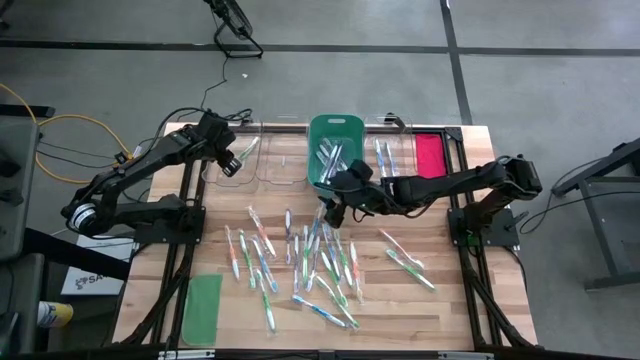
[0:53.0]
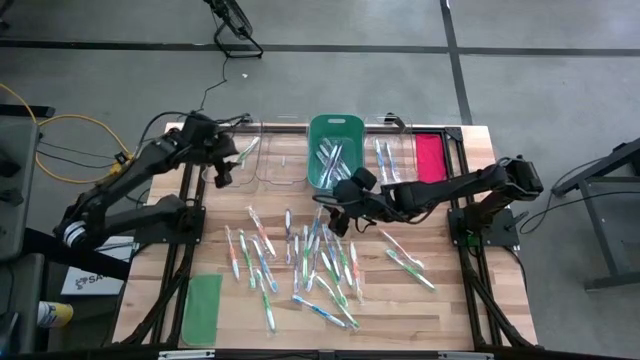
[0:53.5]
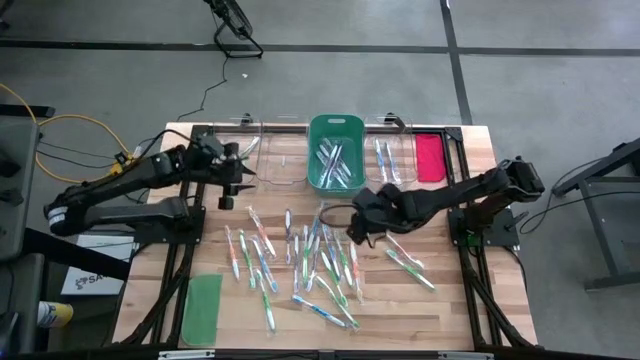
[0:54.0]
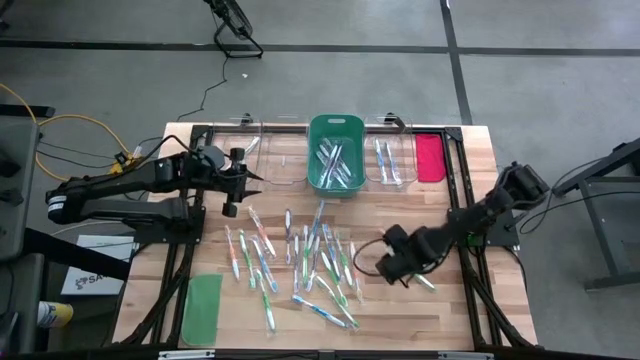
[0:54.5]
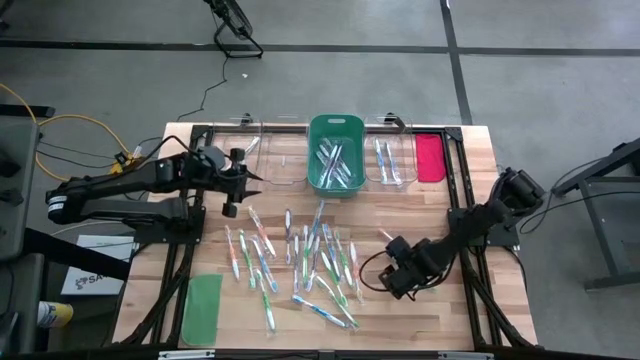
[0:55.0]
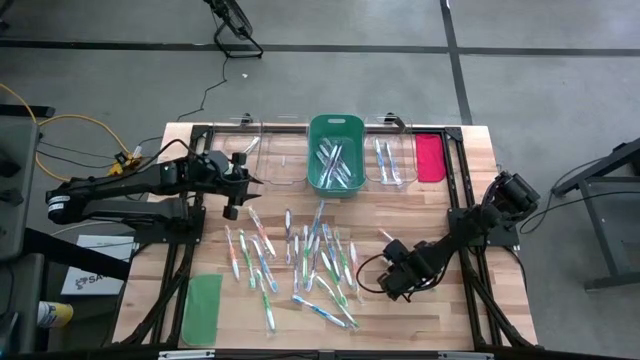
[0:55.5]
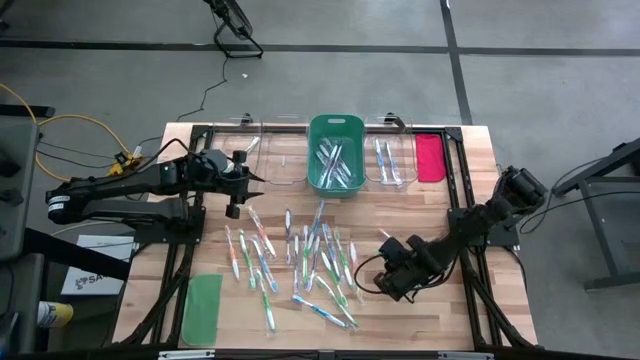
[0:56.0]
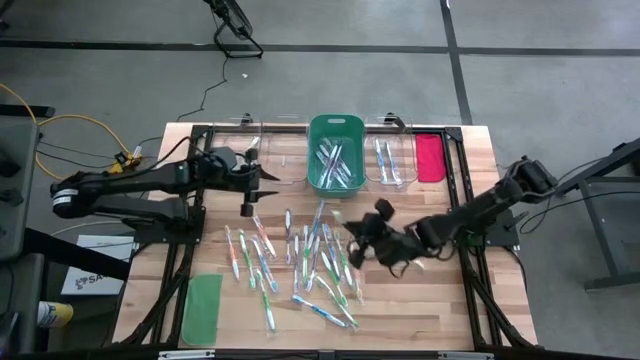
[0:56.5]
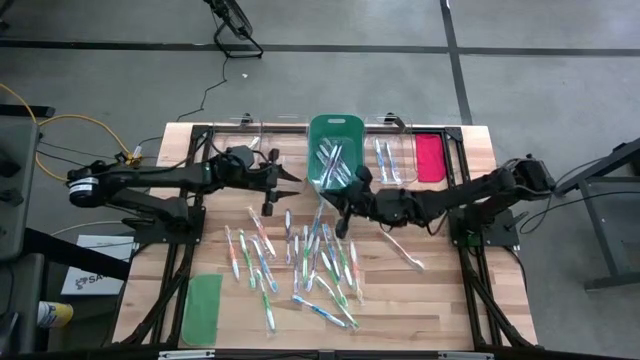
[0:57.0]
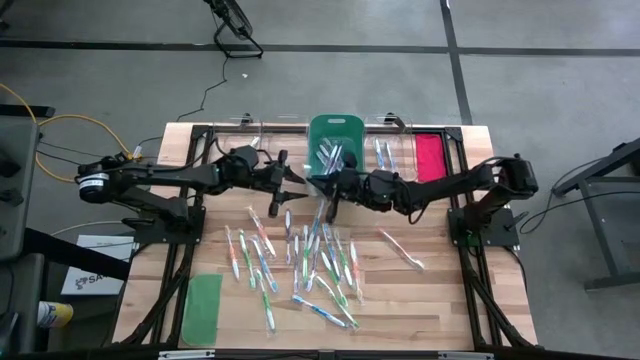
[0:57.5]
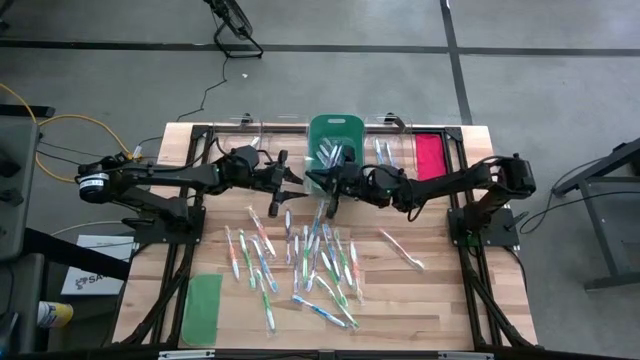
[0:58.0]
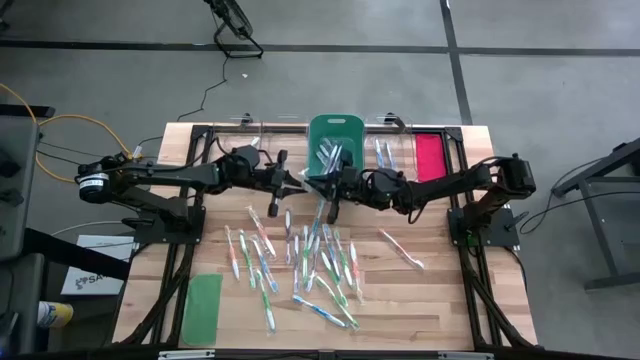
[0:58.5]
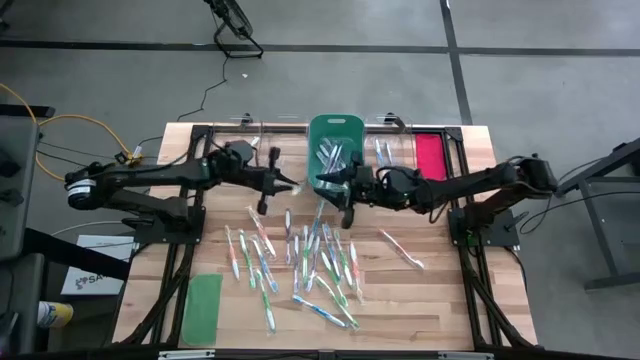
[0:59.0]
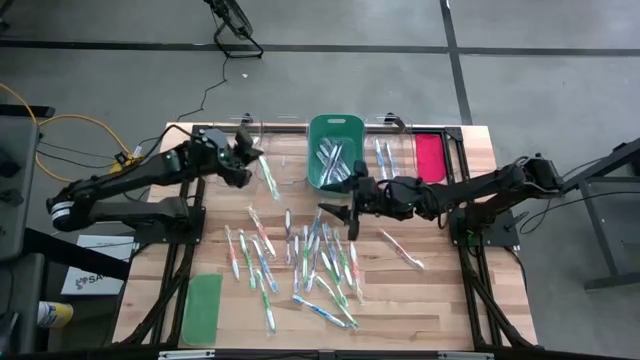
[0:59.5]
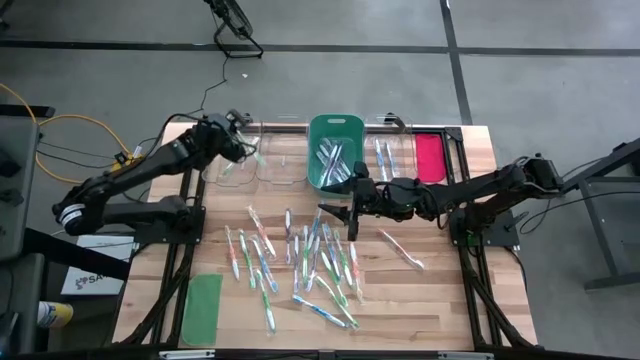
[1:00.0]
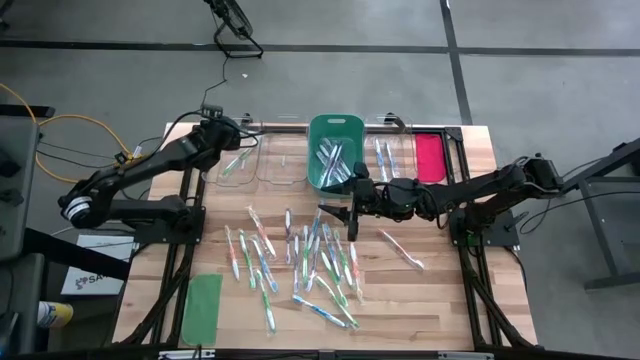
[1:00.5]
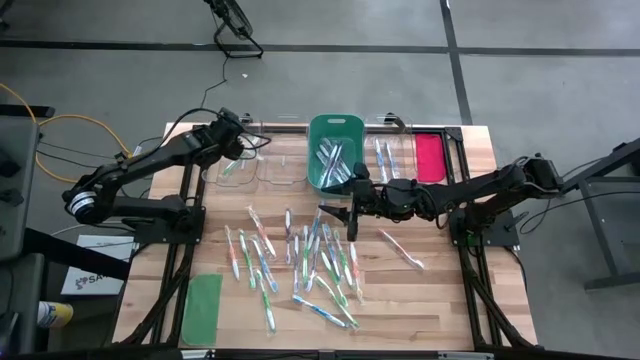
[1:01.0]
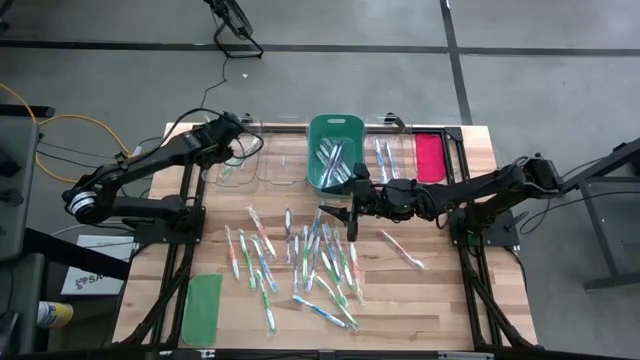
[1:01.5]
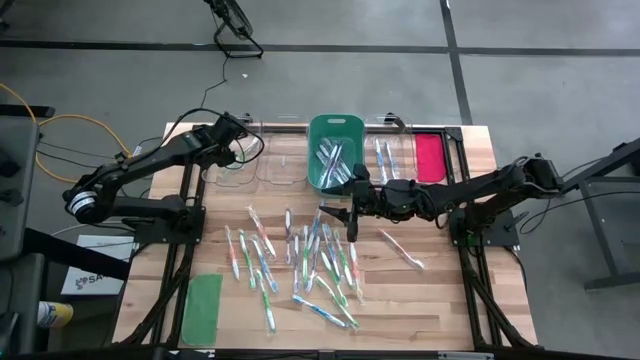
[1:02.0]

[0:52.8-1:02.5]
Task: Pick & Place Toothbrushes
Put the green toothbrush into the left transparent bin

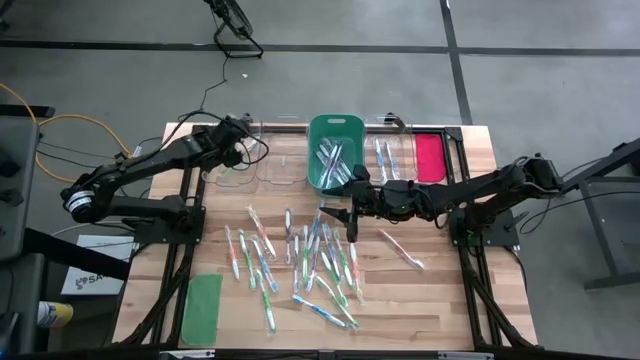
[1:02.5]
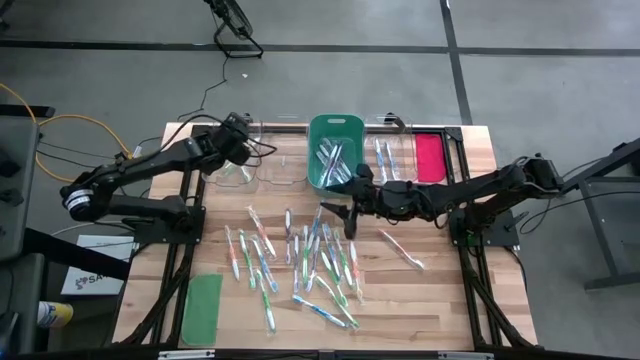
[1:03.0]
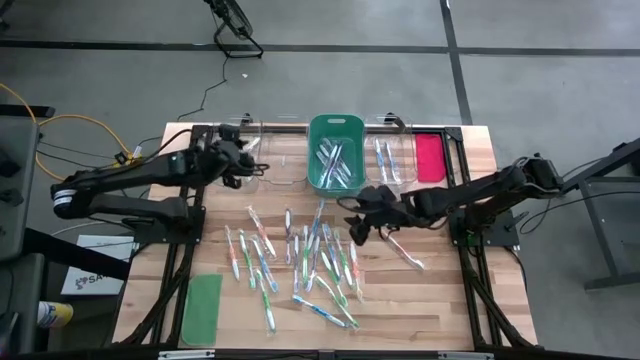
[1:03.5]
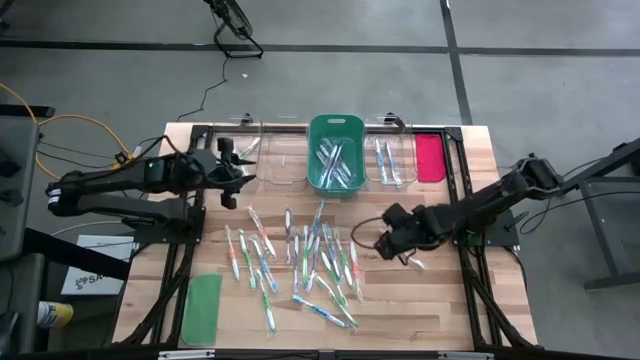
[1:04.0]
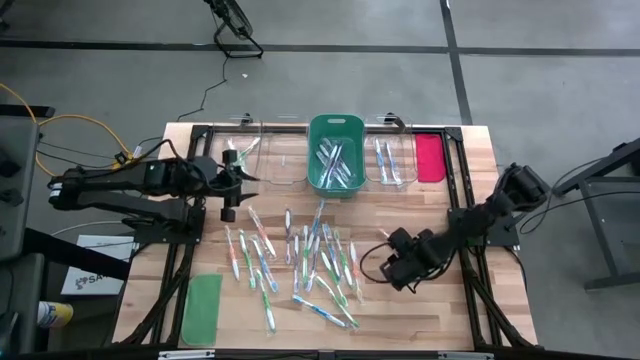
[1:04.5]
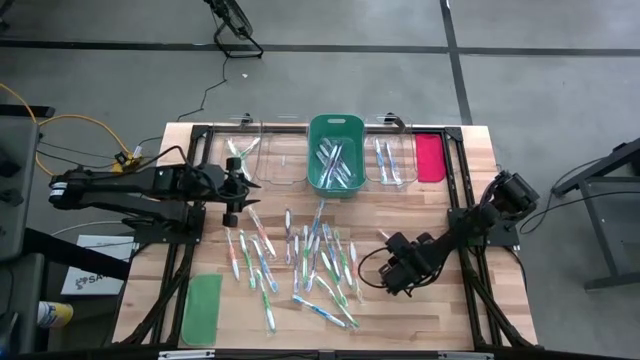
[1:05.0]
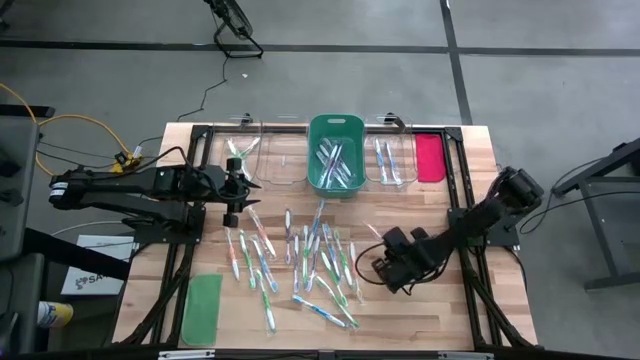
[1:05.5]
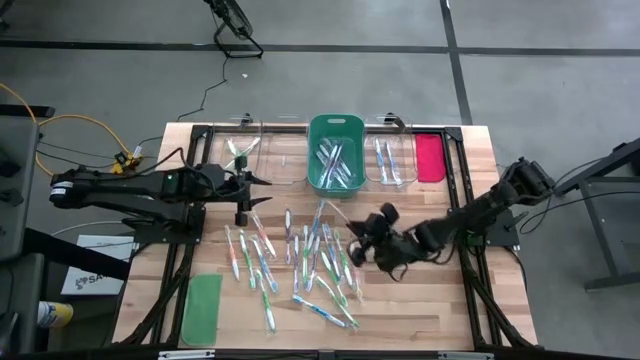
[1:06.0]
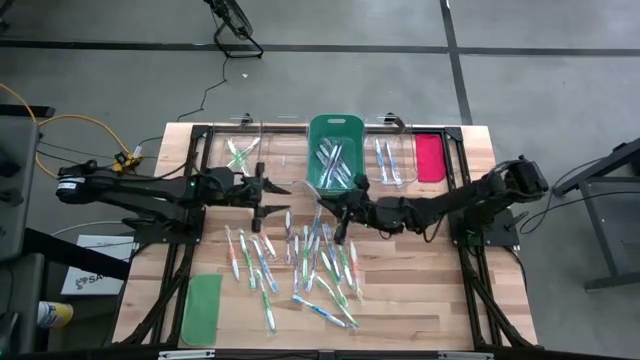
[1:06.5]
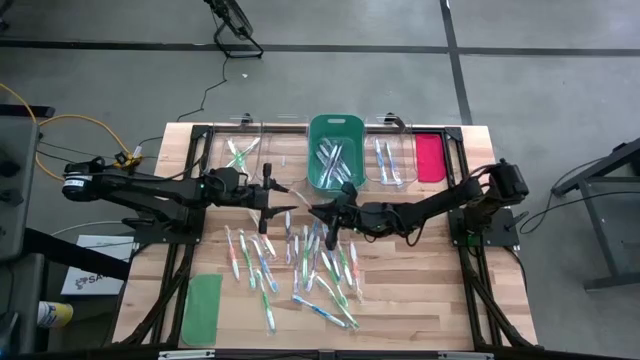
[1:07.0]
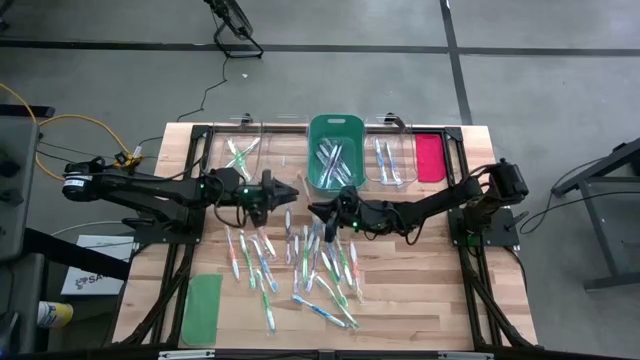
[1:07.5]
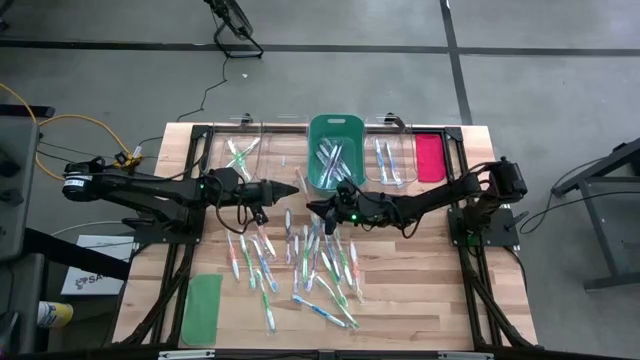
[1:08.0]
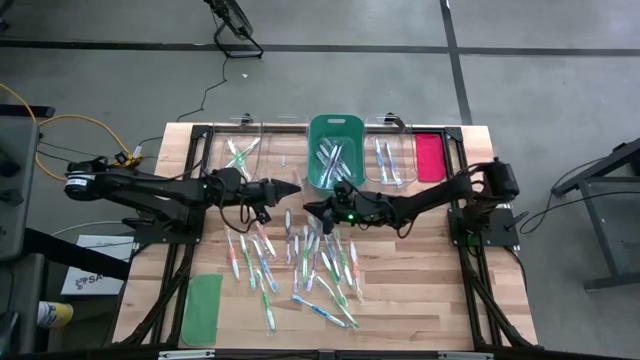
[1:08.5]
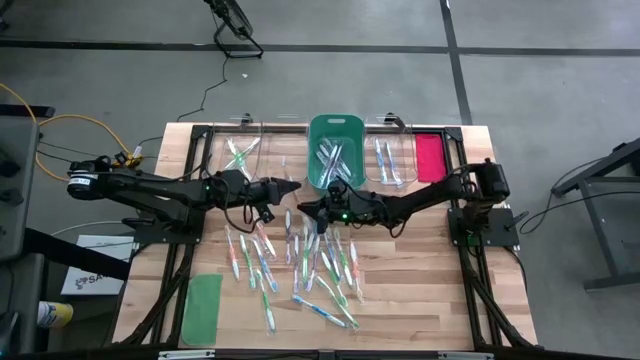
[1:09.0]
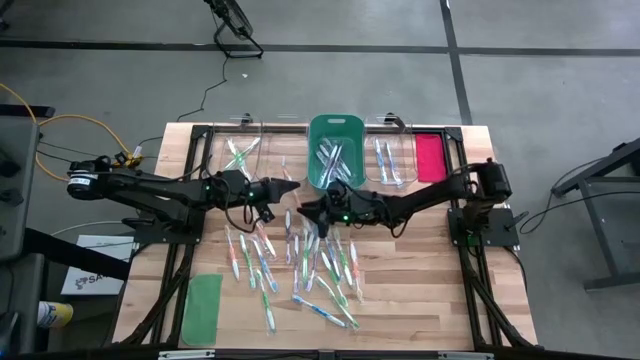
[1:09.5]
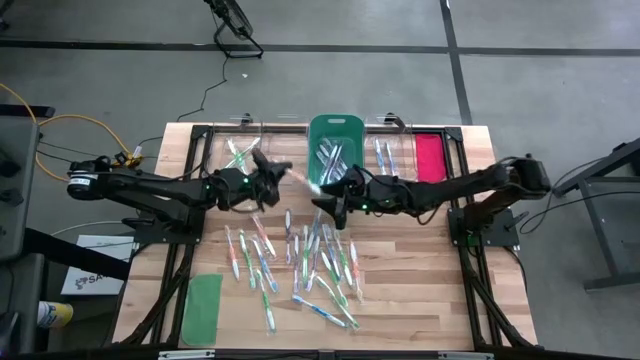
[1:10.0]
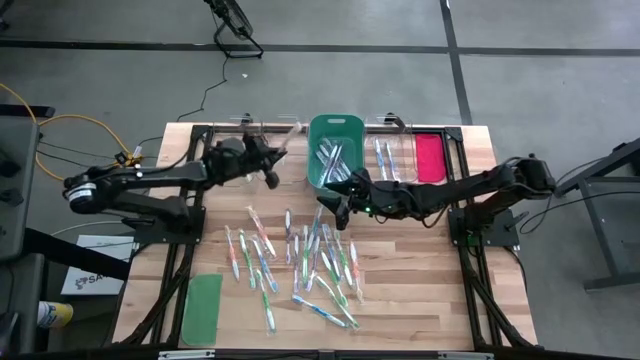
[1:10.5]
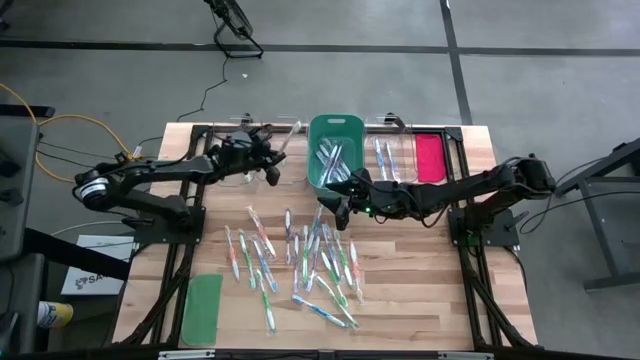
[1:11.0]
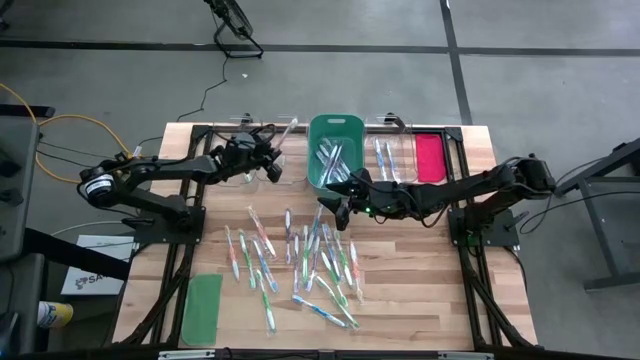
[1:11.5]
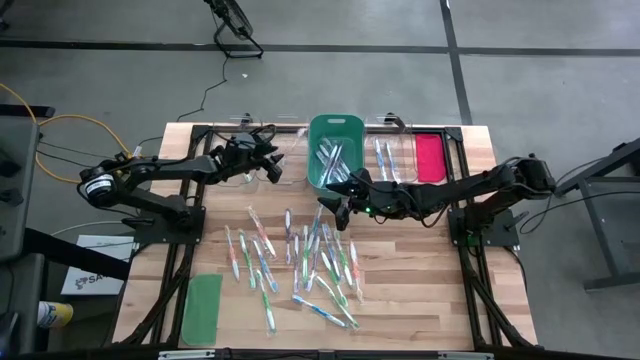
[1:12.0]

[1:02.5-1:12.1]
Put the orange toothbrush into the middle transparent bin

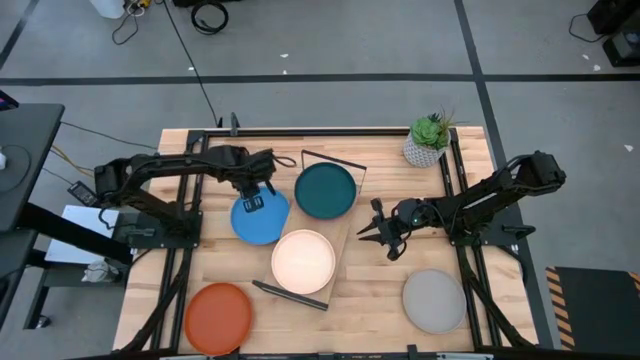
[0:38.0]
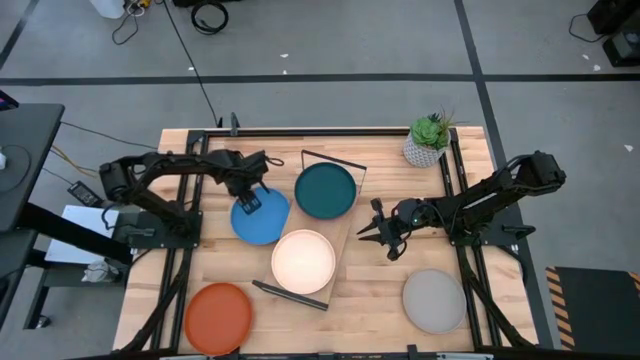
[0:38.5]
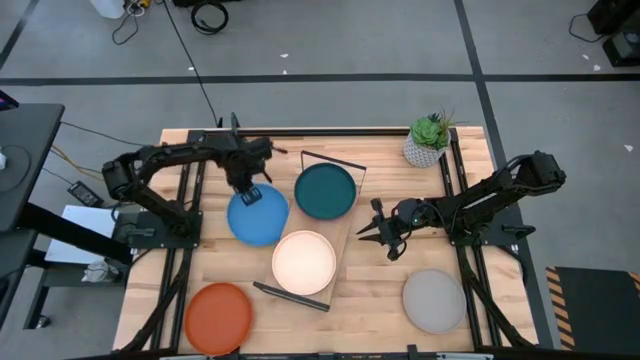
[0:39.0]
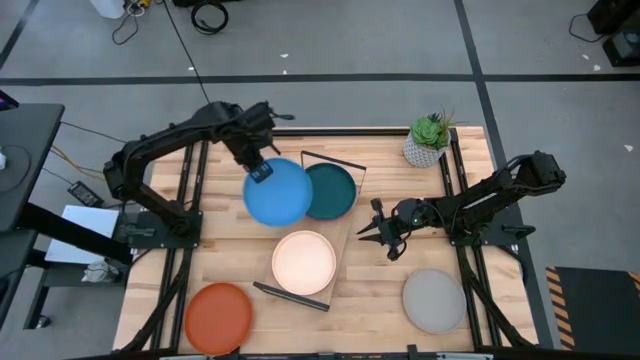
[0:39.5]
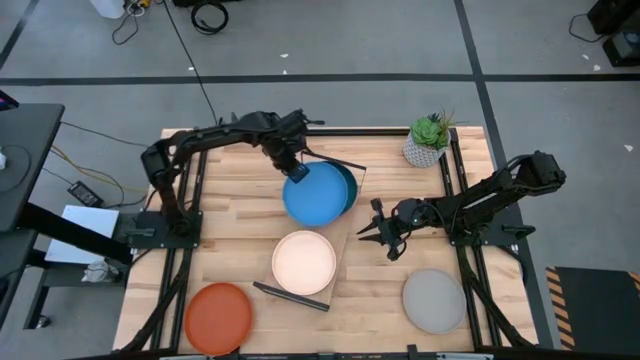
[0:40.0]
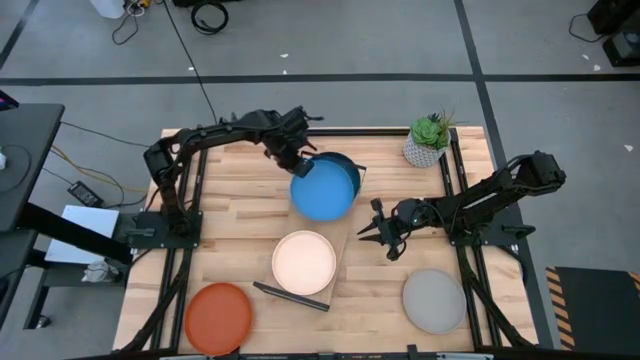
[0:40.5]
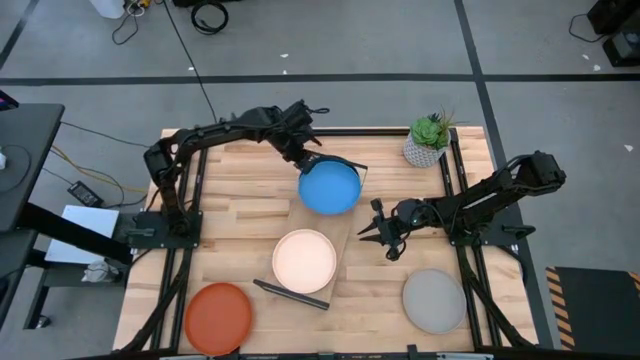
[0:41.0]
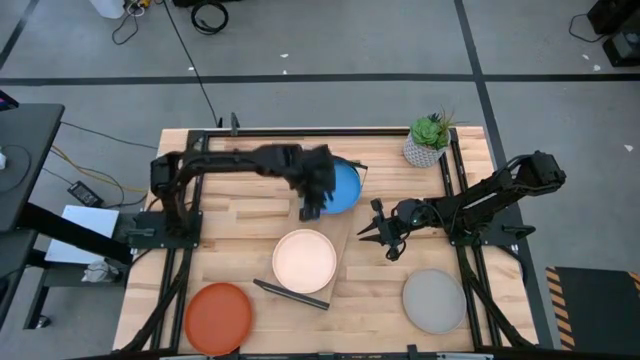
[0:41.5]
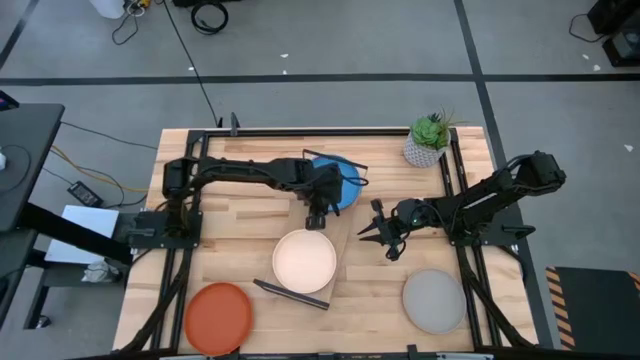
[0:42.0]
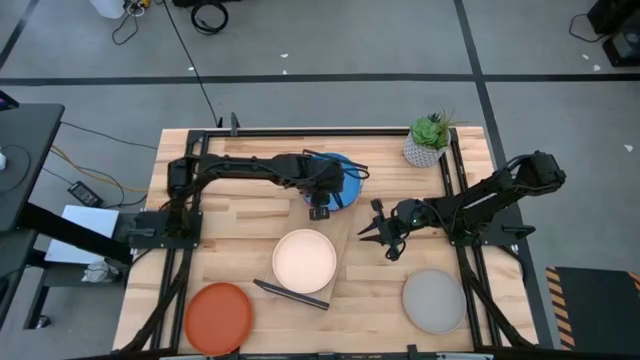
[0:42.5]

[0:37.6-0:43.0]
Task: Place and stack plates onto a shelf
Stack the blue plate on top of the green plate on the shelf
